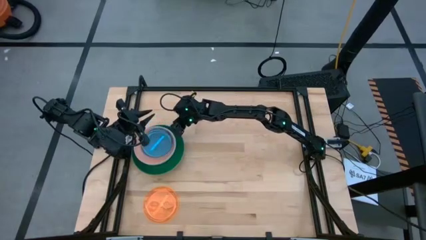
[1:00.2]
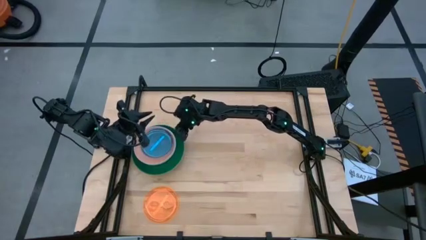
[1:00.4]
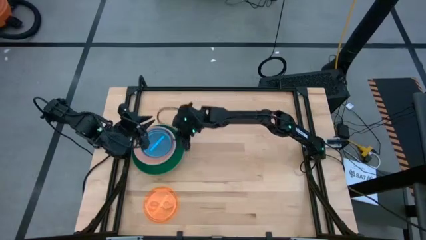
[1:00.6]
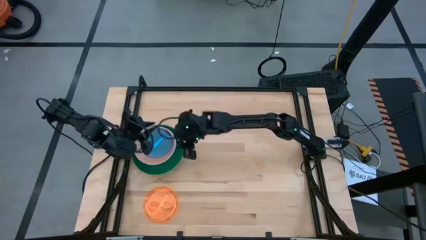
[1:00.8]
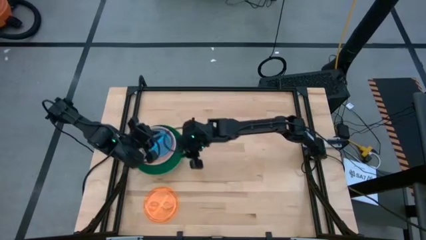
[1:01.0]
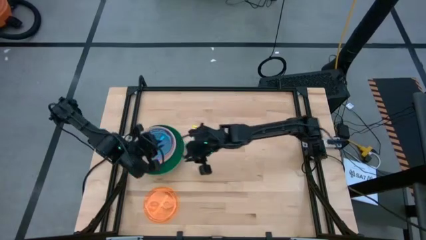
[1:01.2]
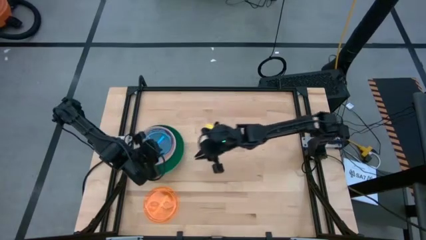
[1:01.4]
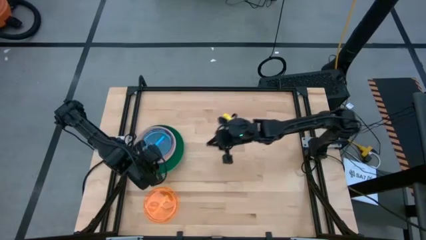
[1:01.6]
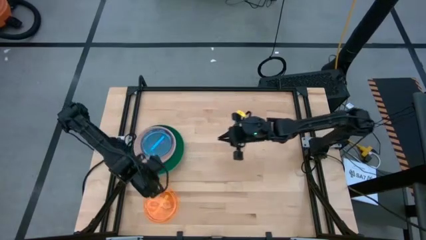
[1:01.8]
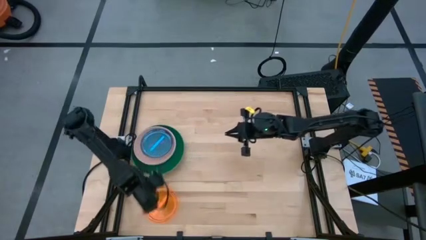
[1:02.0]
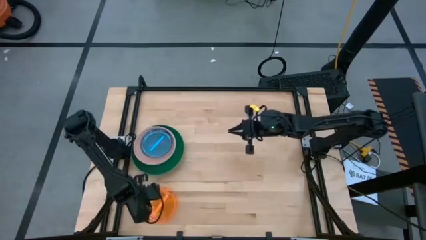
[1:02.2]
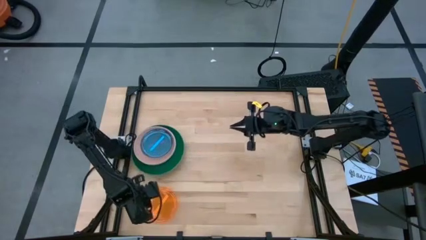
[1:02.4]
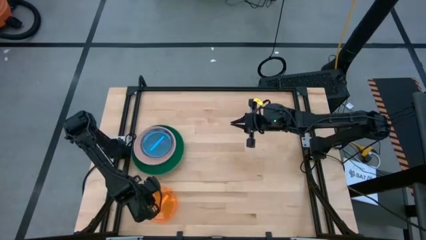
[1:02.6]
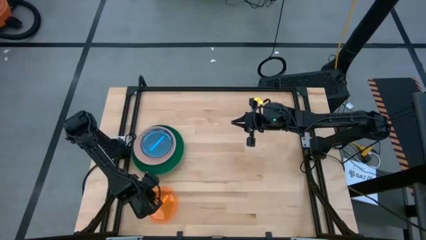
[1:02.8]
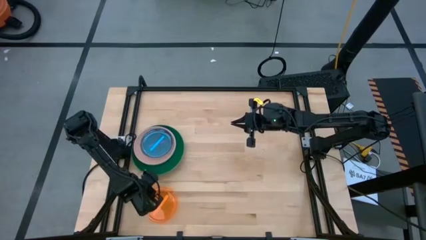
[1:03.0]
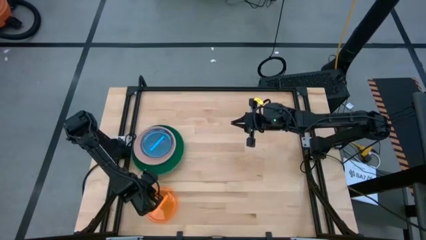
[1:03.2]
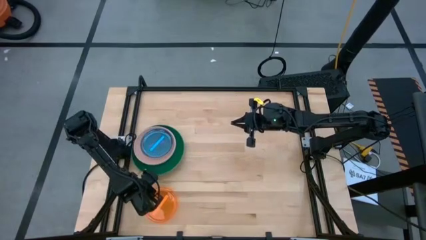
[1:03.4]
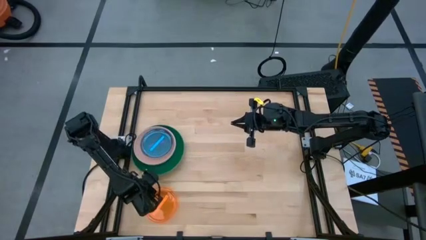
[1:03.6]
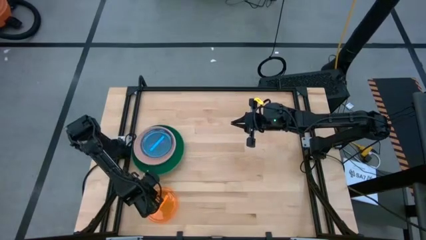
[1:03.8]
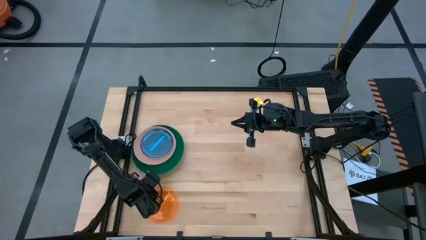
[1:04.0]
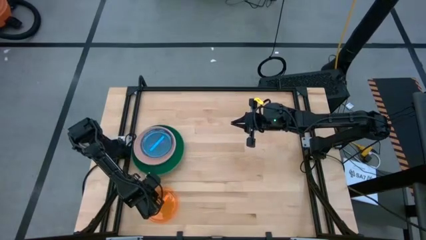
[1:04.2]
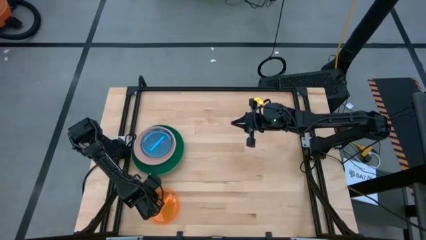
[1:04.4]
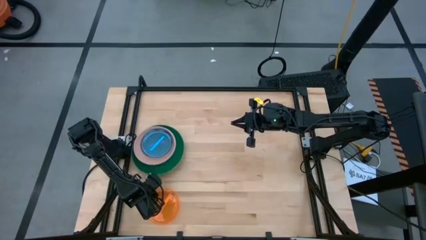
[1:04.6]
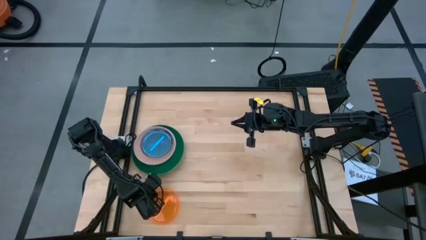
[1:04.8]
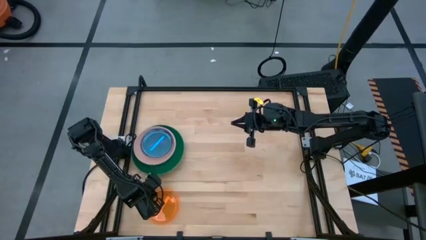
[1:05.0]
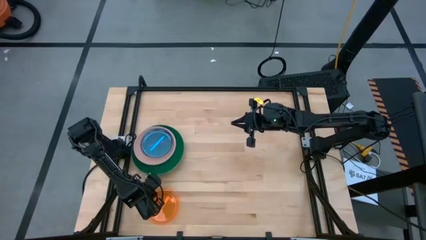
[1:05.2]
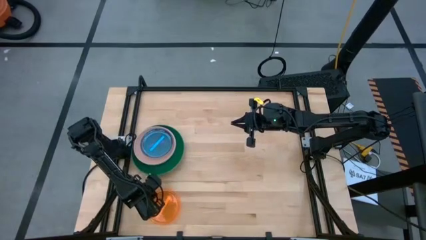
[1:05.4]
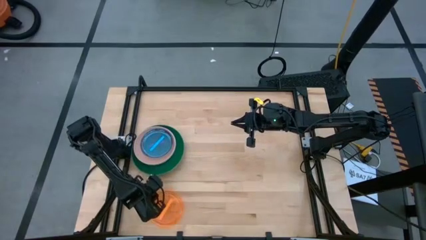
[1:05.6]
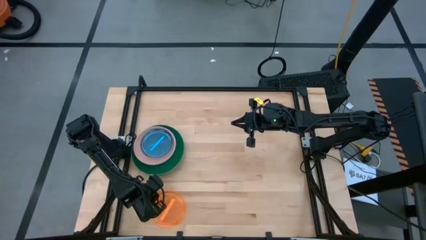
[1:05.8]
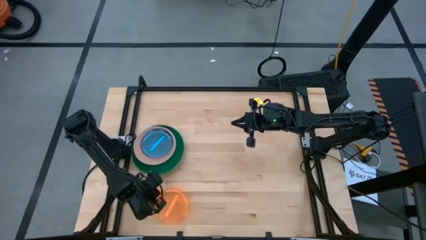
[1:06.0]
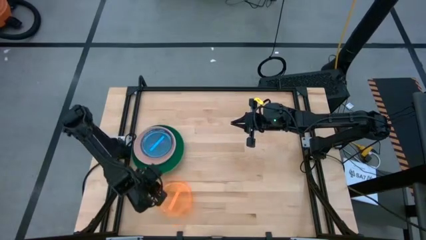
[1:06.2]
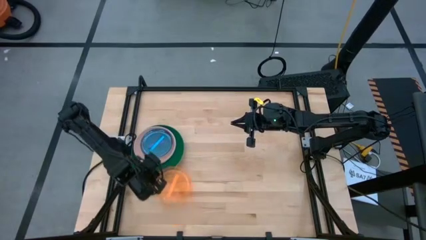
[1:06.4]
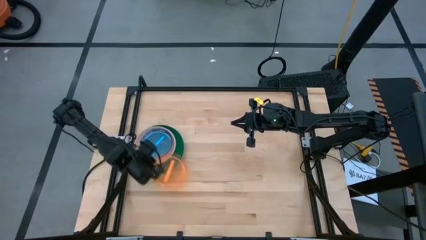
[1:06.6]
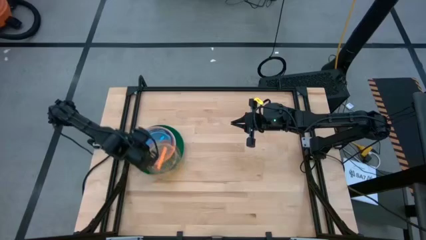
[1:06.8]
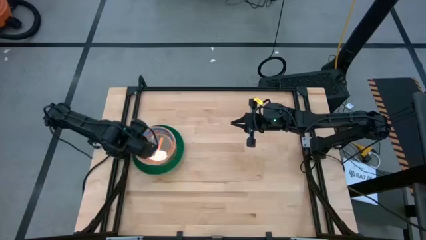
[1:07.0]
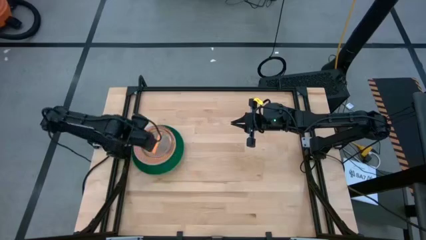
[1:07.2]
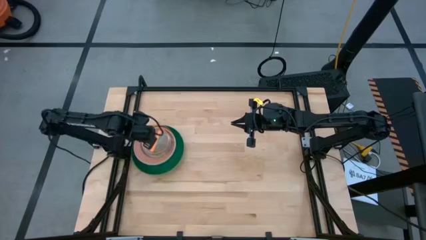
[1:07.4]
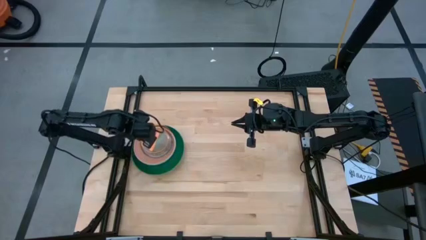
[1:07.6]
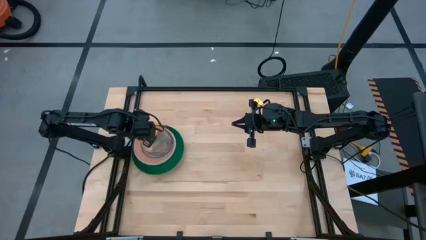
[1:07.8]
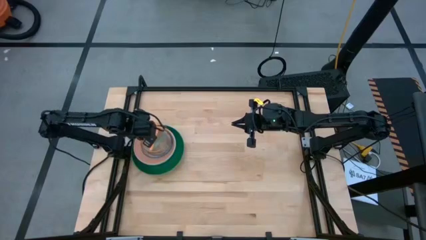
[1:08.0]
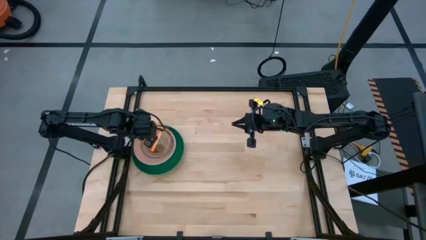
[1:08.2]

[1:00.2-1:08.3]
Task: Stack plastic plates
Stack the orange plate on top of the blue plate

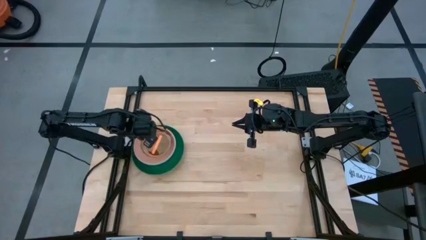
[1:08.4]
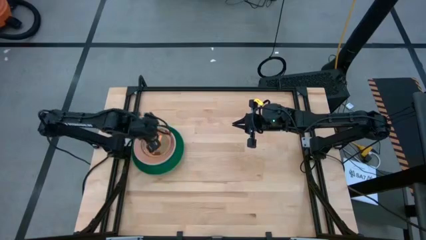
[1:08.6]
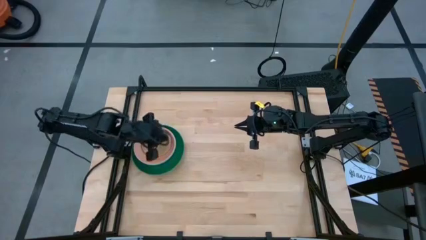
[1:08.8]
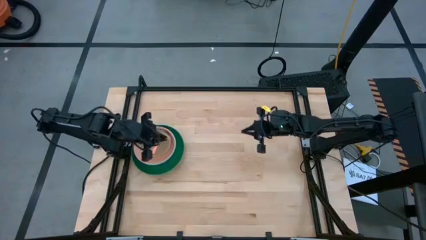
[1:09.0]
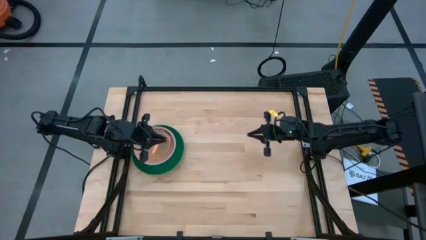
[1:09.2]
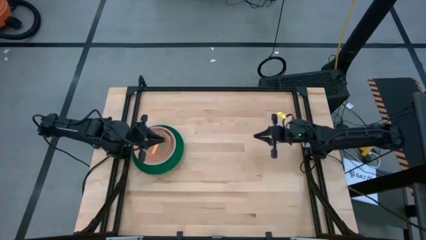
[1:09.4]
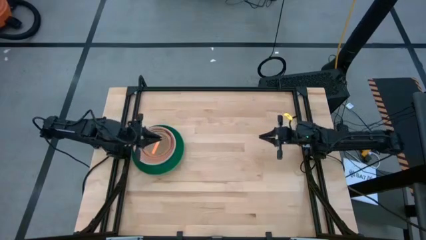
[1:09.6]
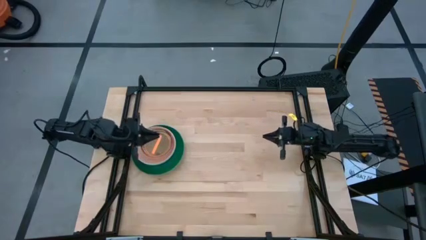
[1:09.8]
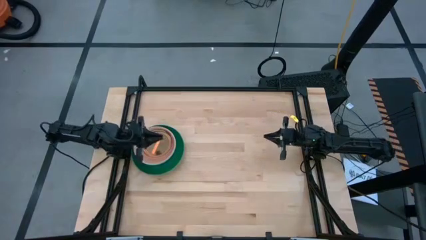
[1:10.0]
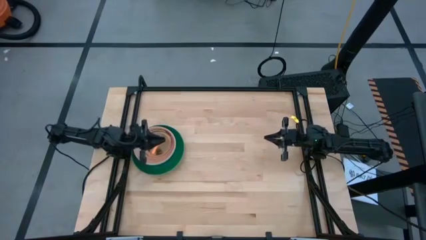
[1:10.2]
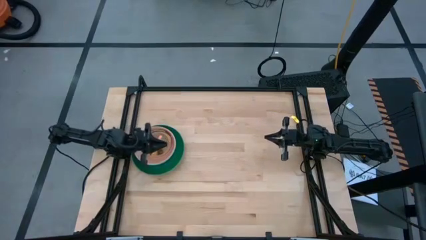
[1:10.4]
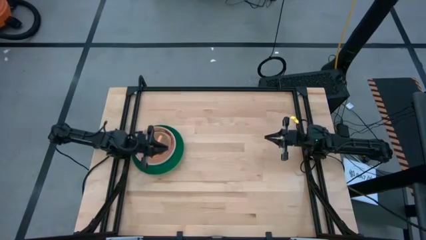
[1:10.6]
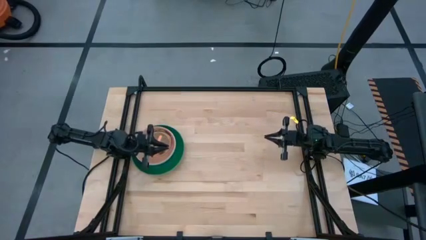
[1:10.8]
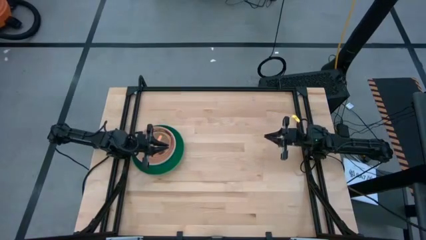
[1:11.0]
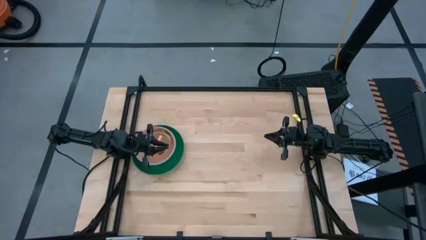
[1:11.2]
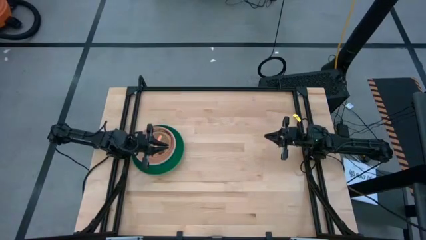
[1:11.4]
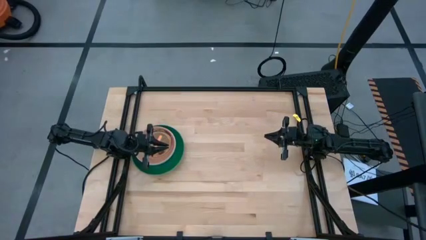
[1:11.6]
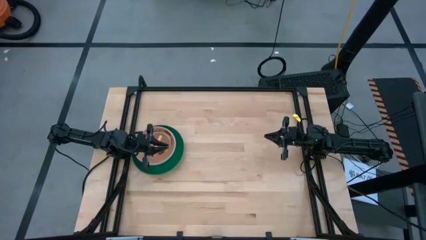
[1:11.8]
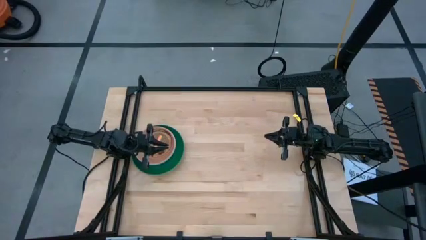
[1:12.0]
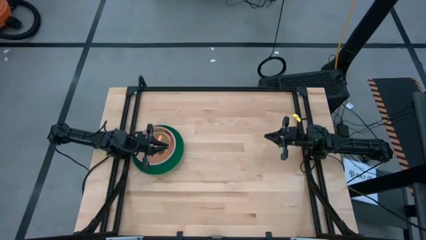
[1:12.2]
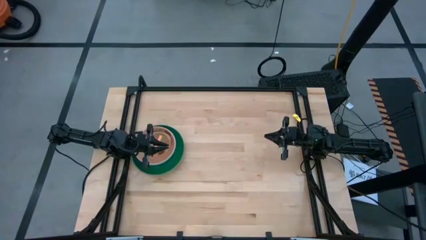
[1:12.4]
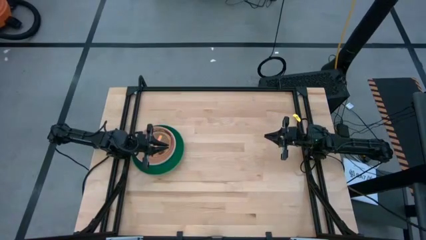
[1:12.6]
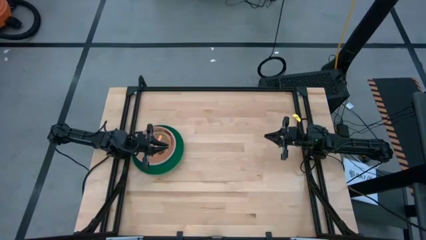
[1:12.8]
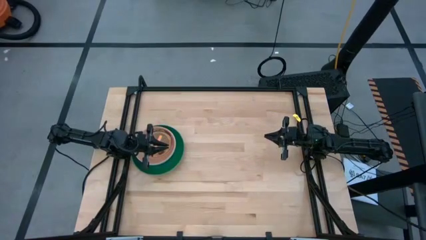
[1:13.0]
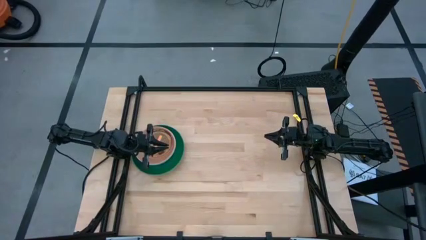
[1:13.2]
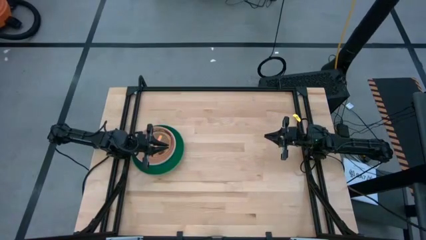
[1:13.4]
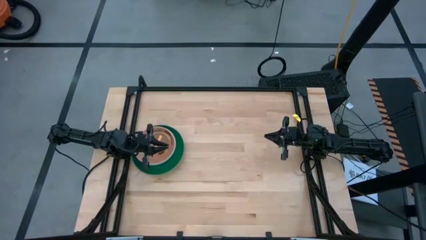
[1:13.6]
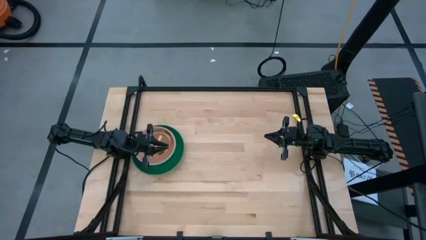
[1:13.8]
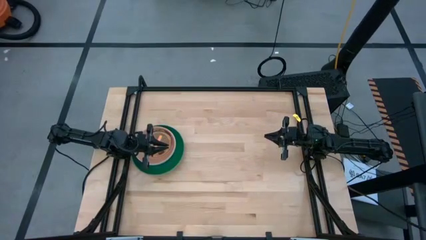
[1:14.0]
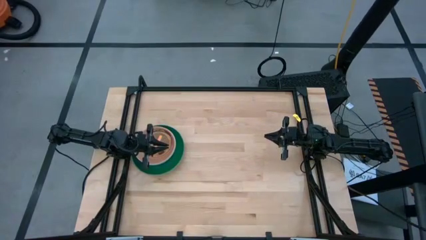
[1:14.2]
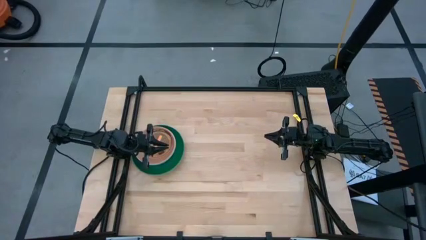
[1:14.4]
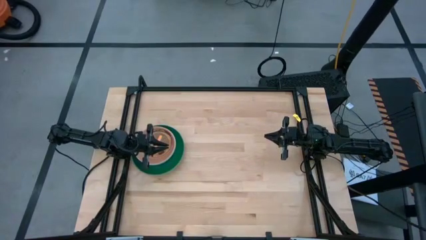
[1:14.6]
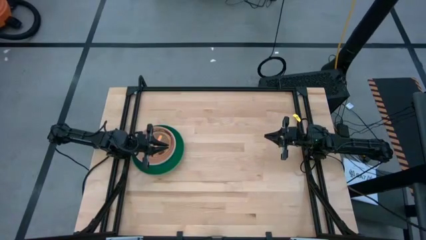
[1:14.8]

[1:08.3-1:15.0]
Return to Home Position

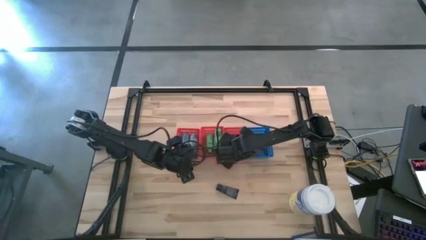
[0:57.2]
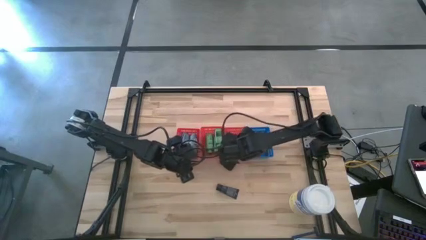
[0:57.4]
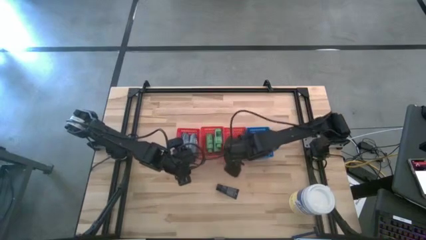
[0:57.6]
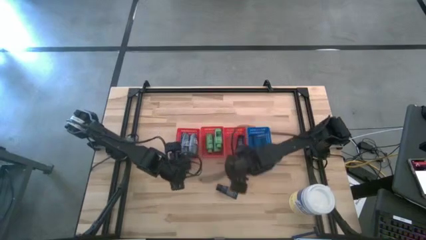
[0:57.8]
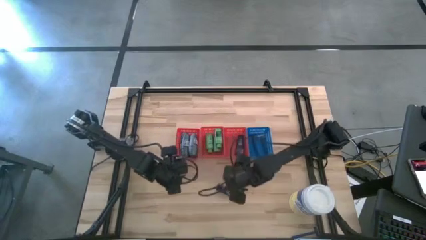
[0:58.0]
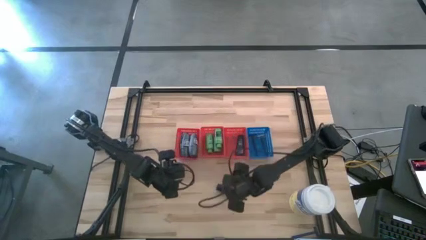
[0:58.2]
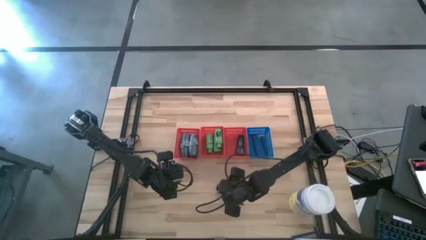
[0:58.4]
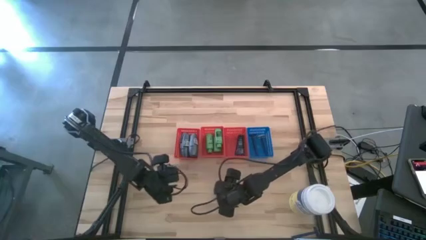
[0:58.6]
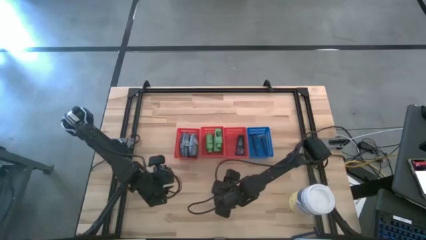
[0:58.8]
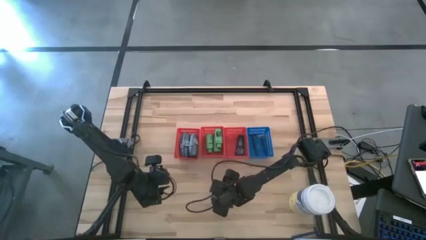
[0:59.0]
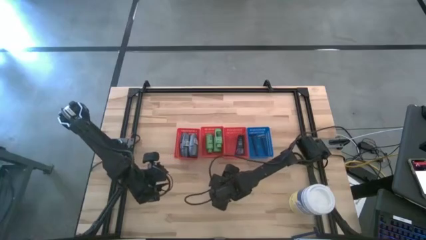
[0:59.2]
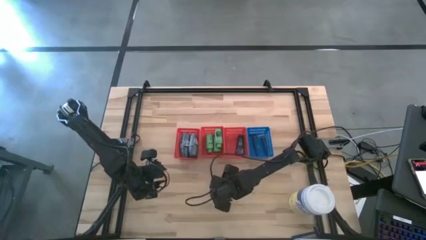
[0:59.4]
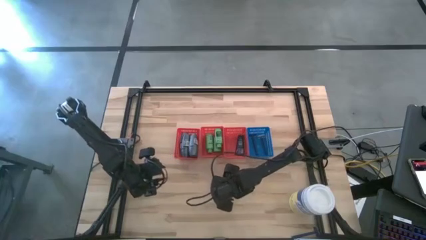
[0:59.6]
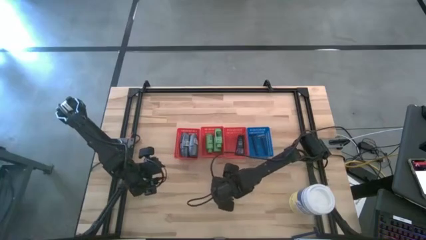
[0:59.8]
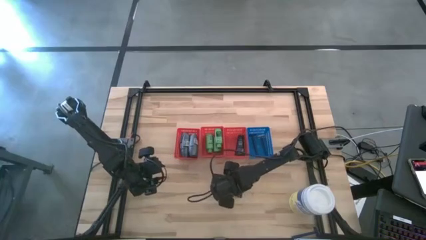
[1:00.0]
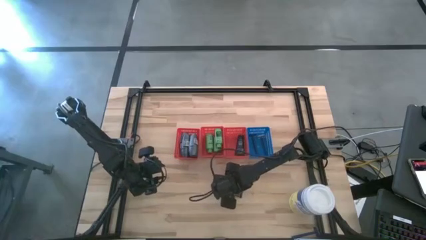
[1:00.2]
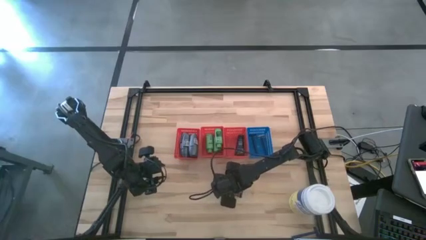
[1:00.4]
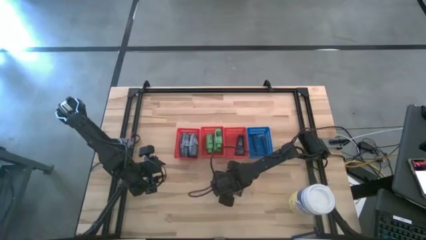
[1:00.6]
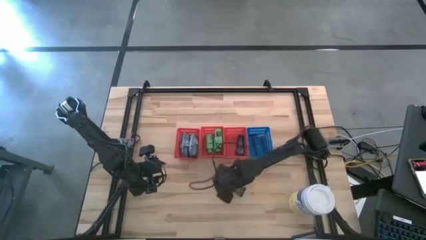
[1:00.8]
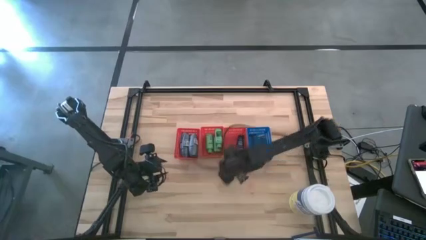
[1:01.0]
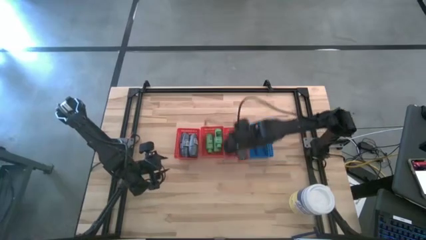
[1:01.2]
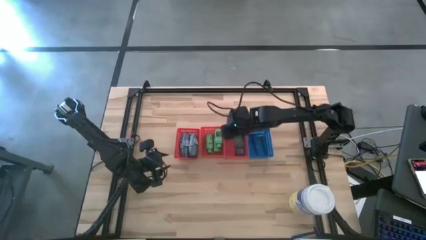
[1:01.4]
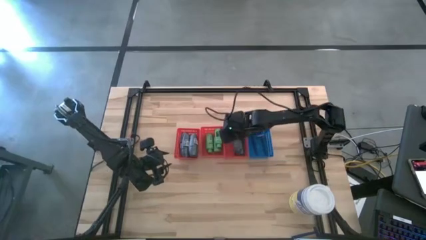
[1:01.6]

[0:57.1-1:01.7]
Task: Pick & Place Travel size toiletries
Put the blue shave cream into the right red bin
